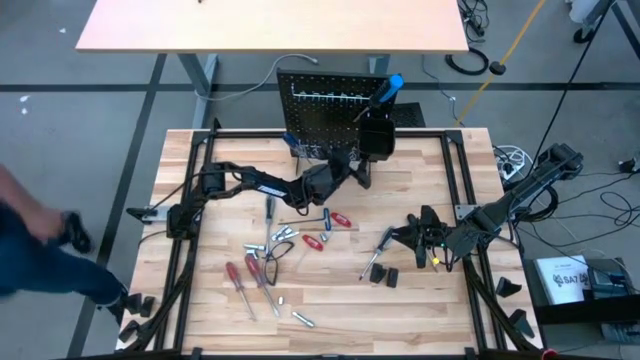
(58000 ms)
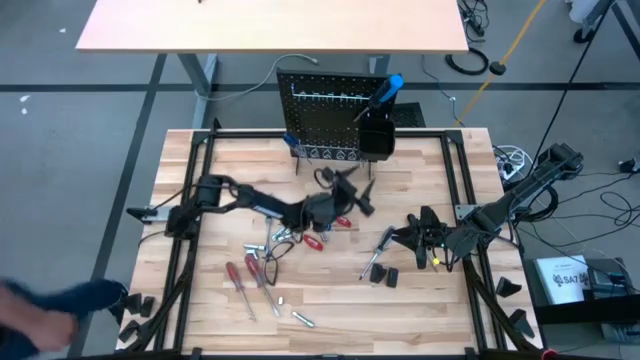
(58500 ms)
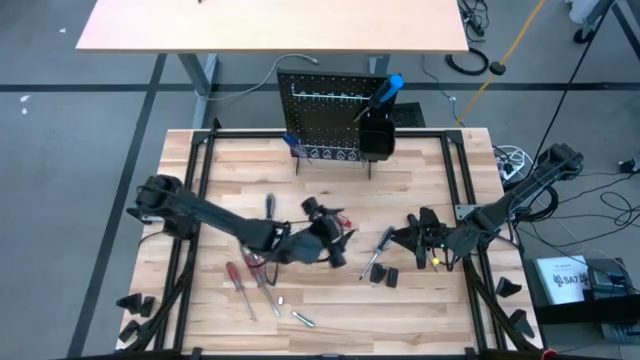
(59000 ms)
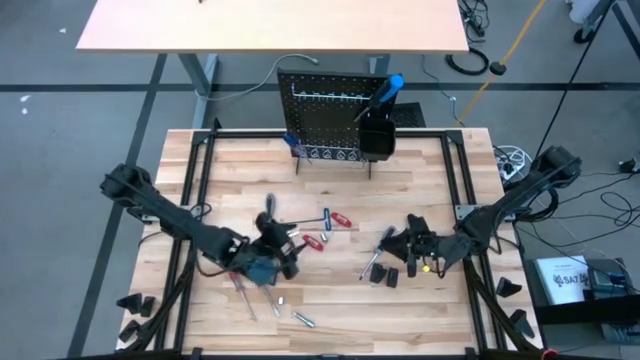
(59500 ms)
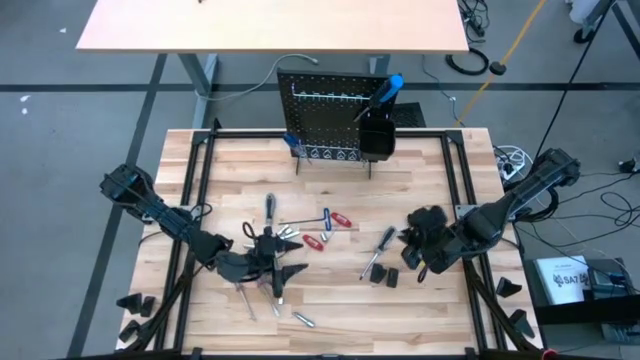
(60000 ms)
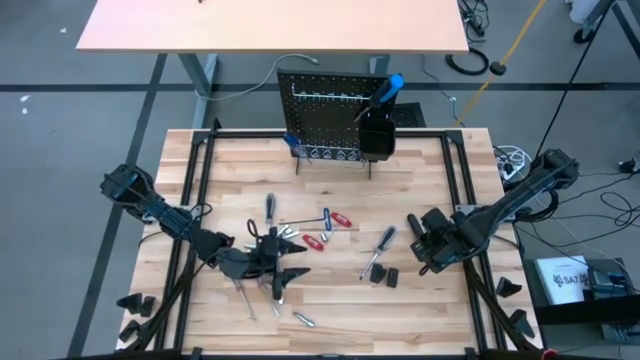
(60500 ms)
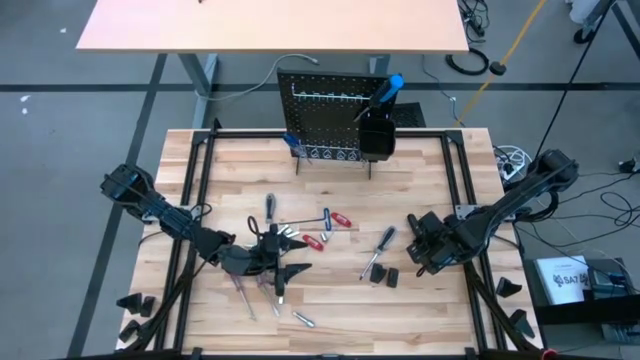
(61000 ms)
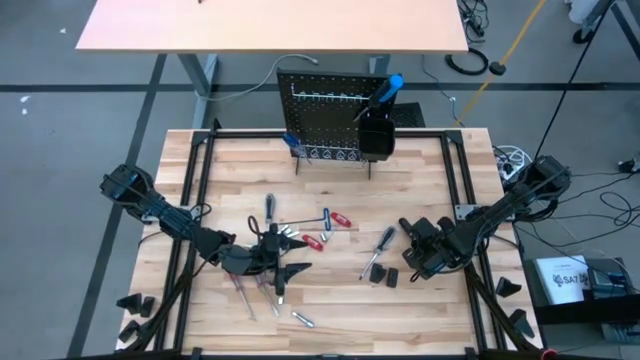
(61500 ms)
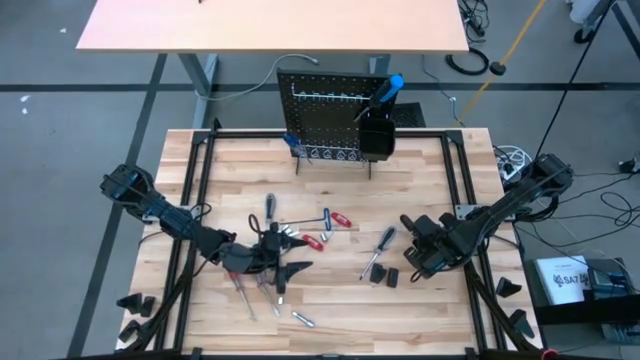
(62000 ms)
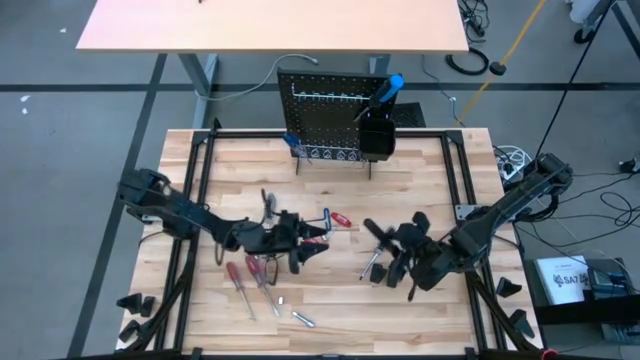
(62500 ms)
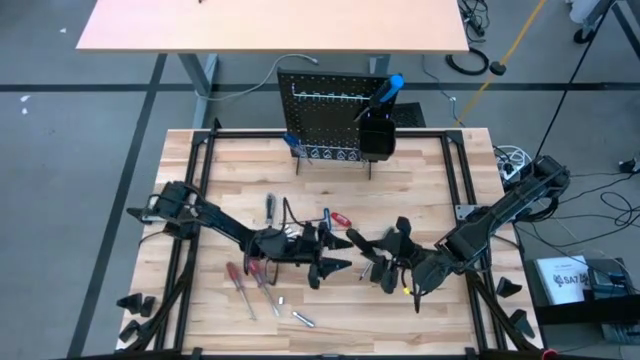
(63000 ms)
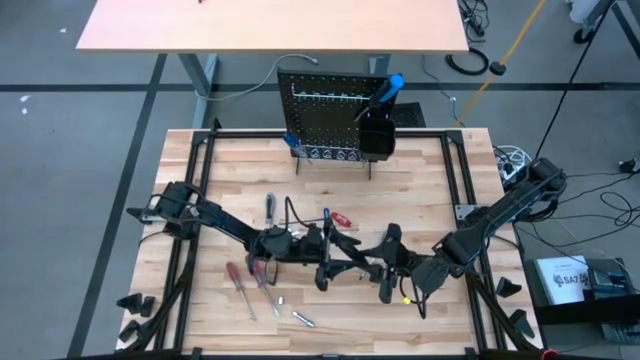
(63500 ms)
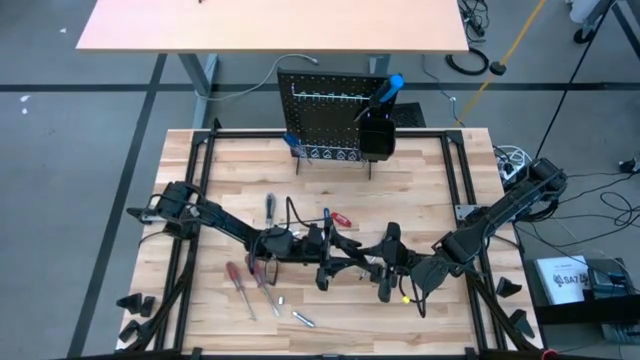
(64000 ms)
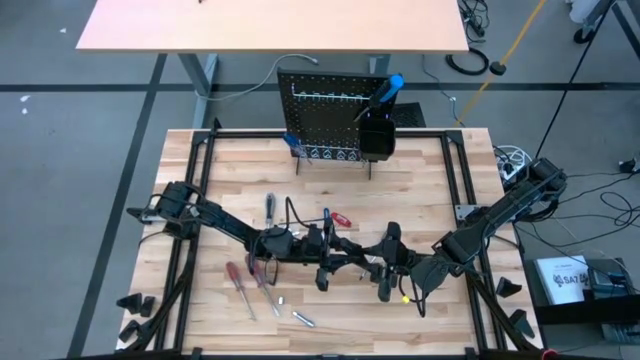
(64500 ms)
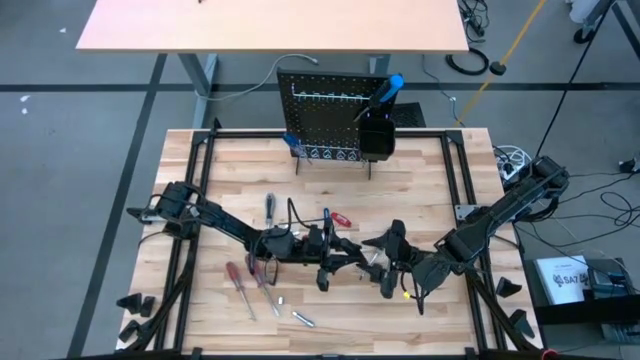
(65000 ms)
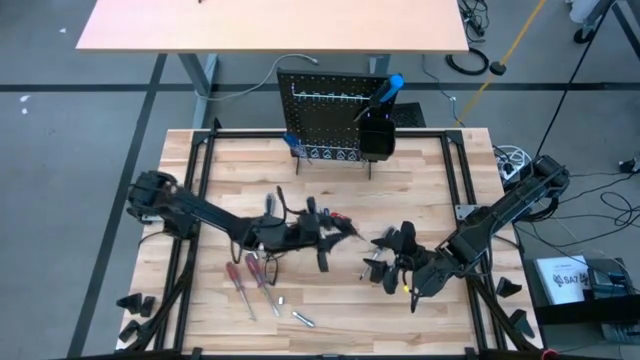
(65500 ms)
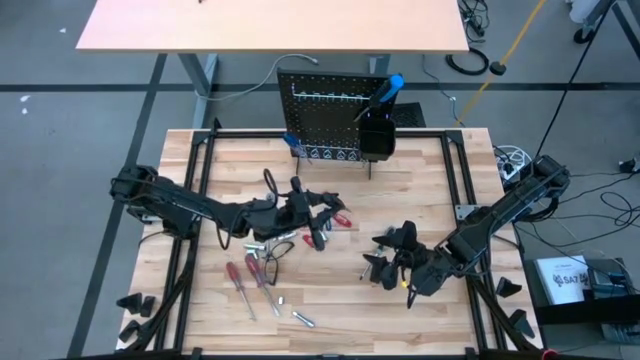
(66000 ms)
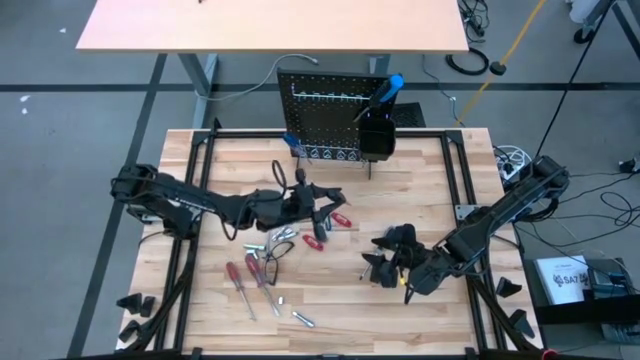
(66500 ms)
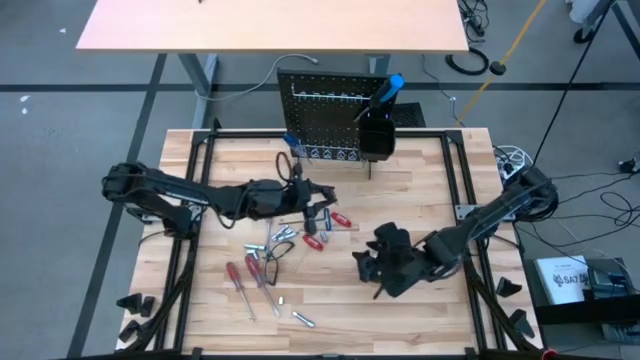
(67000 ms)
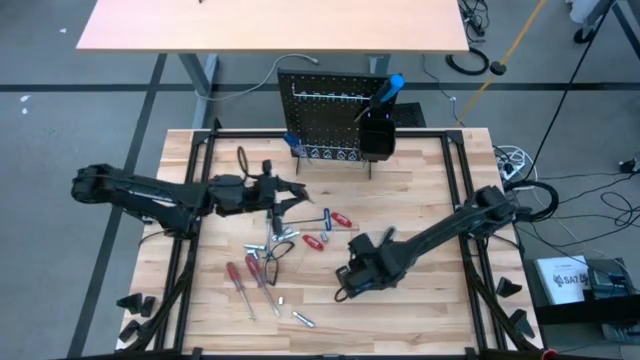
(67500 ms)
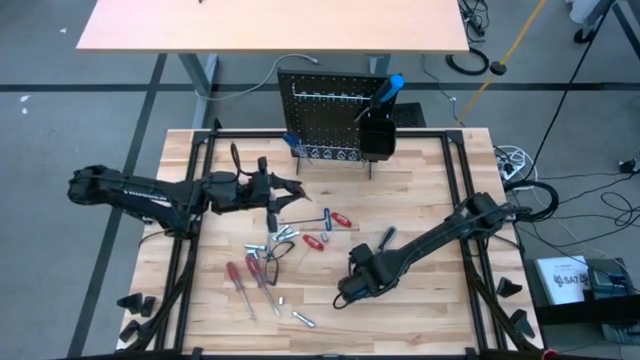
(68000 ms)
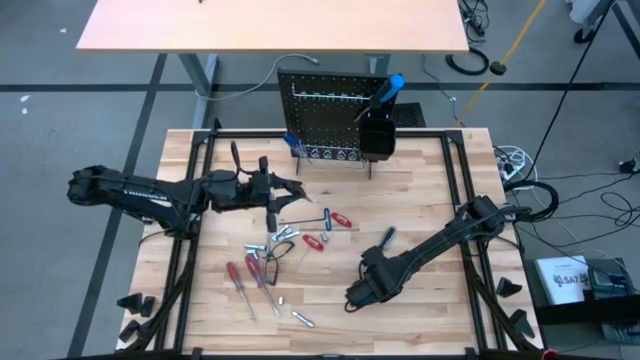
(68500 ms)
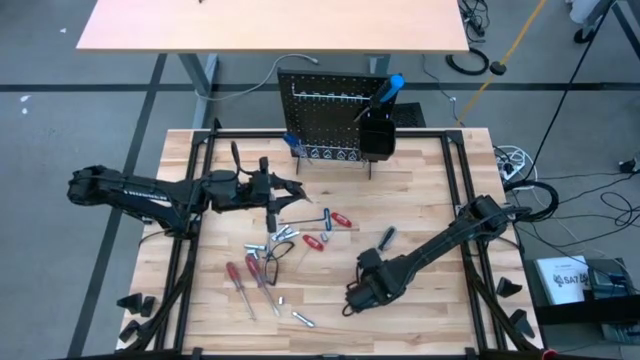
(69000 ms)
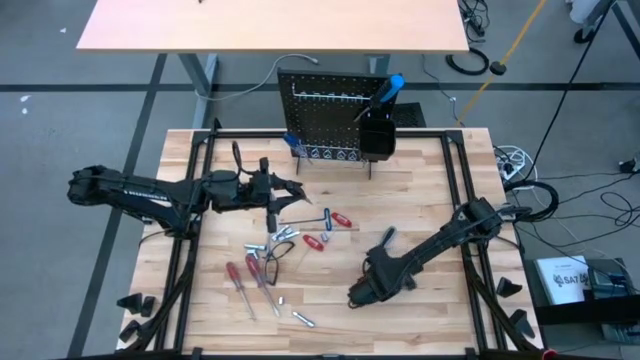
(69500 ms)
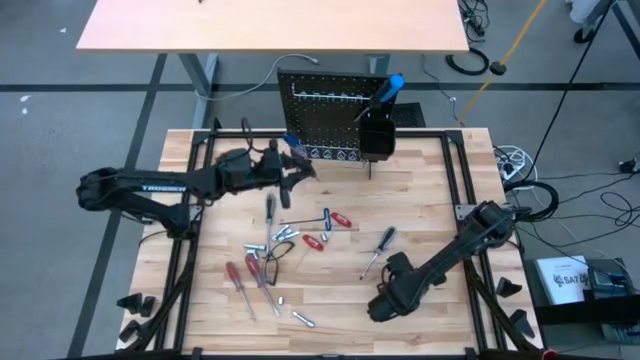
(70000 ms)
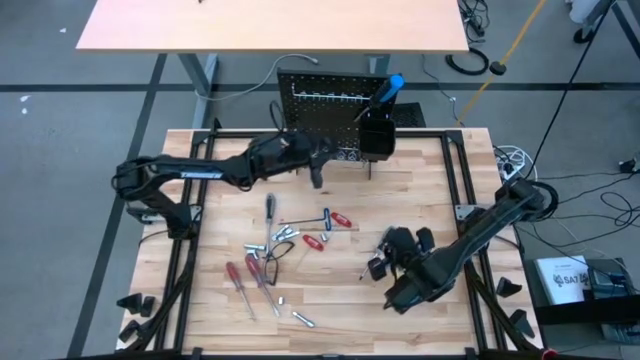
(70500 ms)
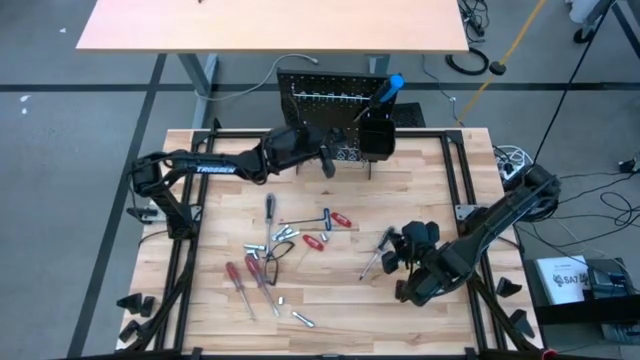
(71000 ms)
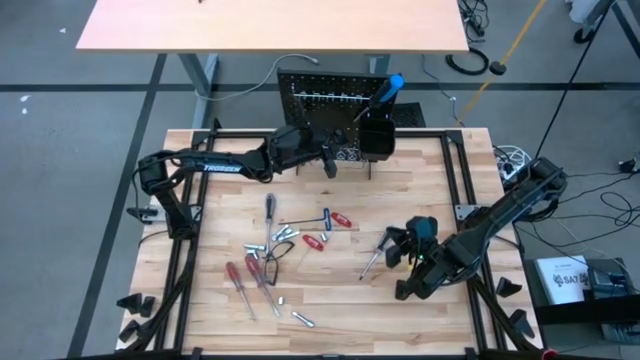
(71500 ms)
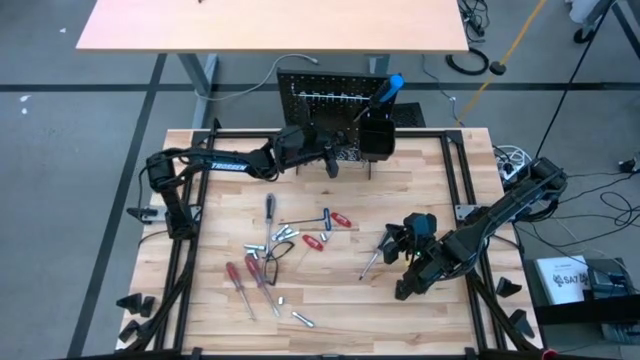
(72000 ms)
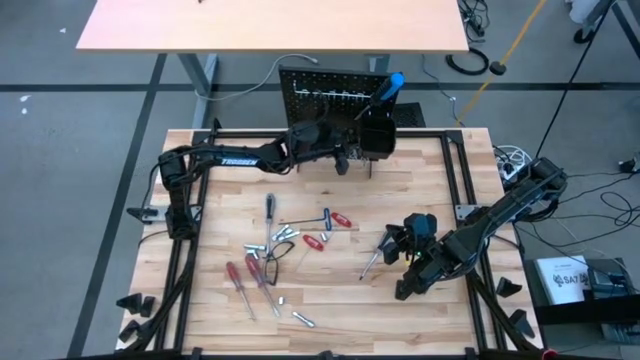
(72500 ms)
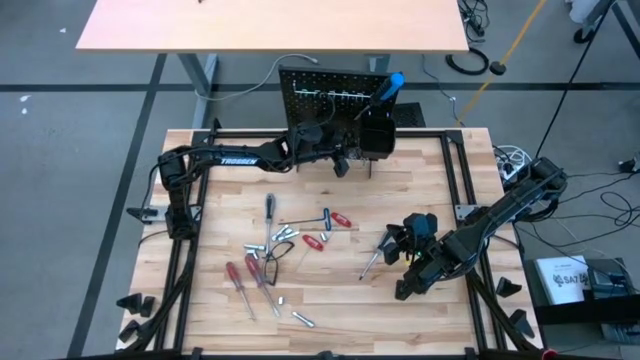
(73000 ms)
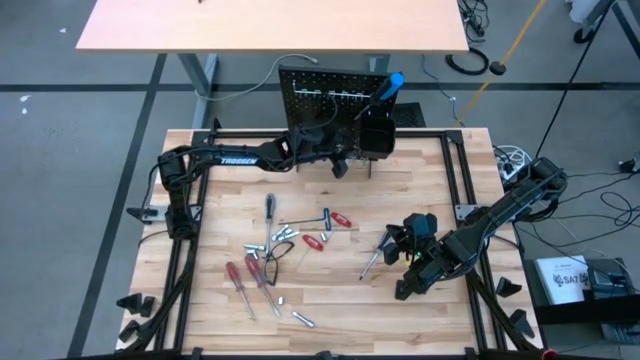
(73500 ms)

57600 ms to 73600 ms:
Task: Hang tools onto peg board
Hang the hex screwdriver onto the peg board

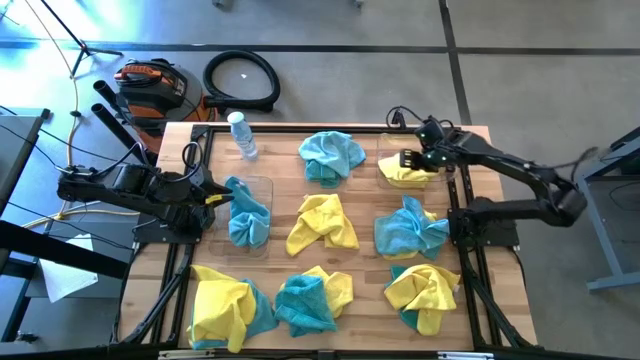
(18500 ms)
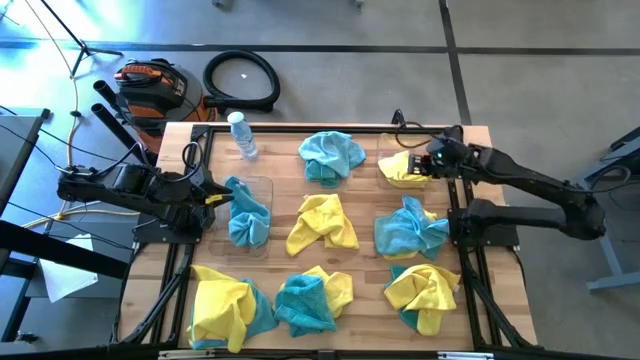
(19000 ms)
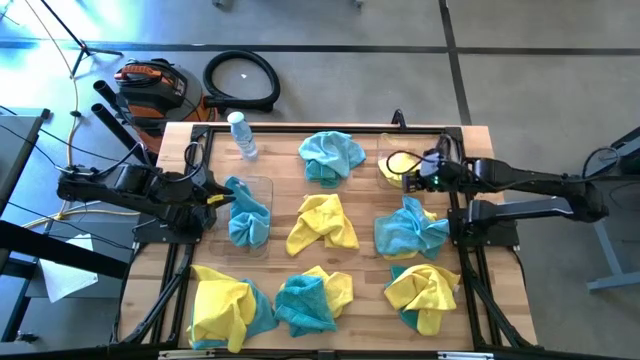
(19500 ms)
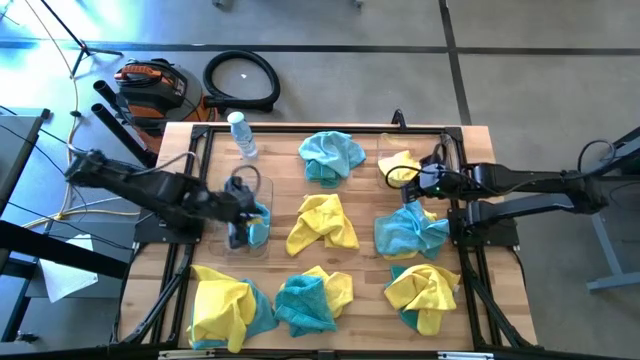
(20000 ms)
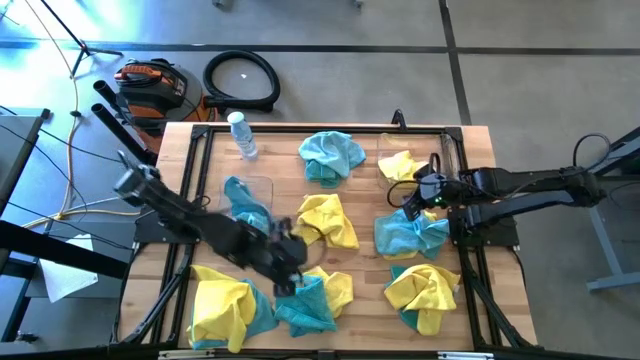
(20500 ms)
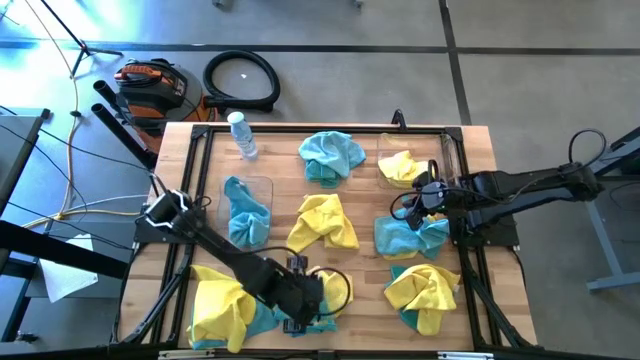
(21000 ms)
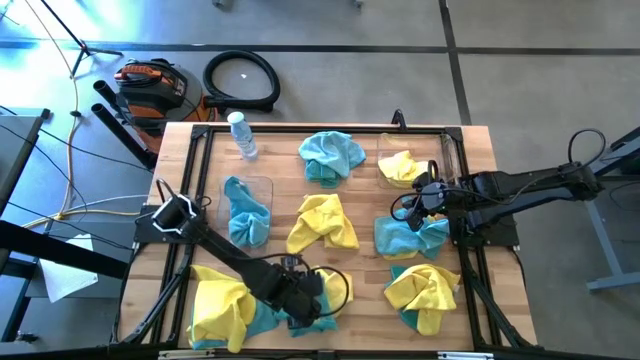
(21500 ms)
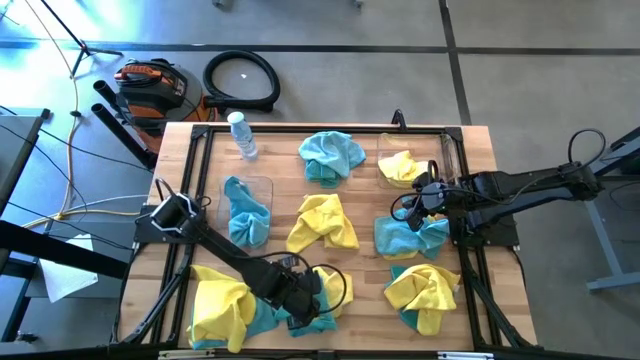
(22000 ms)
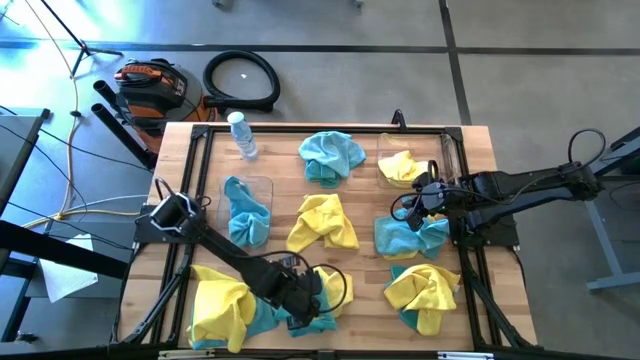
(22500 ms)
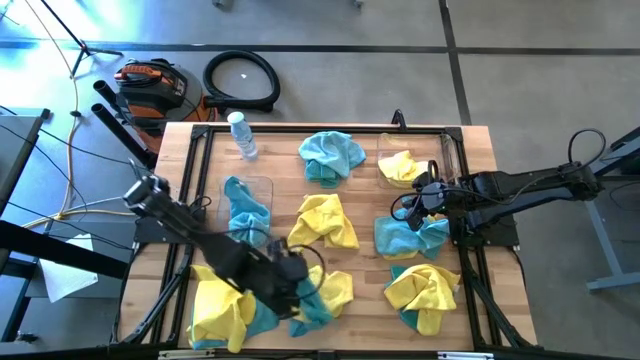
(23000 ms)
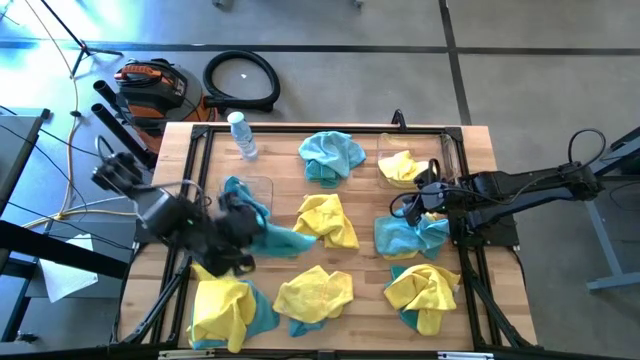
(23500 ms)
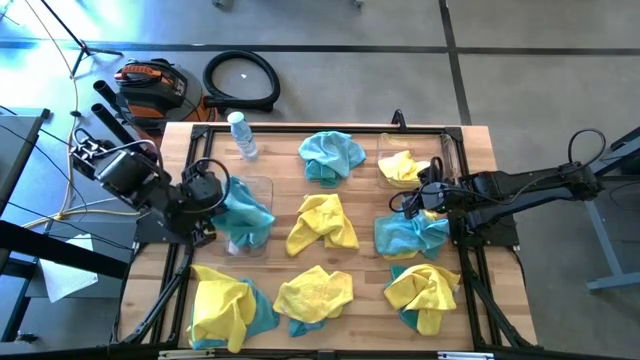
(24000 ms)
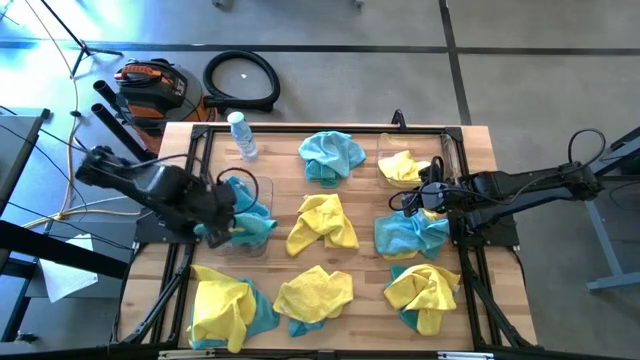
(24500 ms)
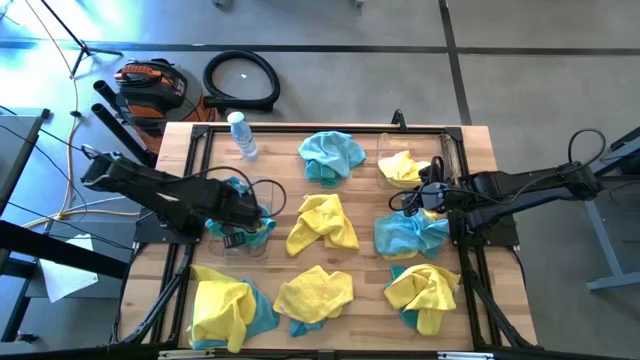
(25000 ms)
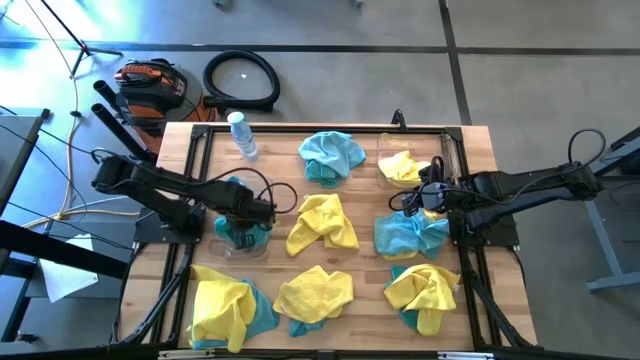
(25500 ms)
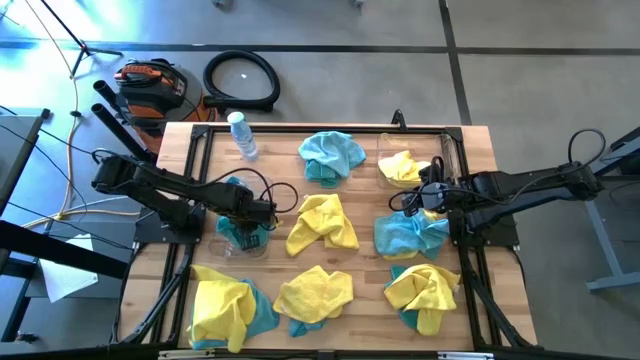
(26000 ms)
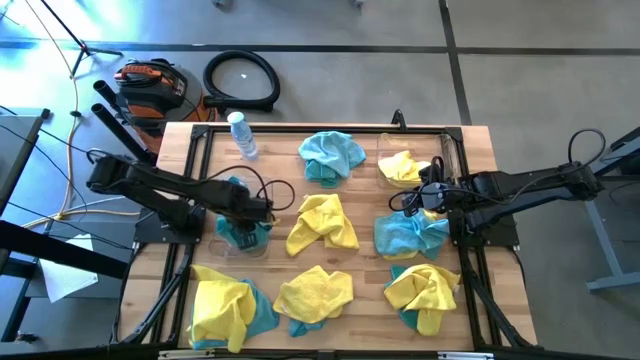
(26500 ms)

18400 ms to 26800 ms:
Task: Sort microfiber towel by color & place in baskets
Put the blue microfiber cloth into the left transparent bin
